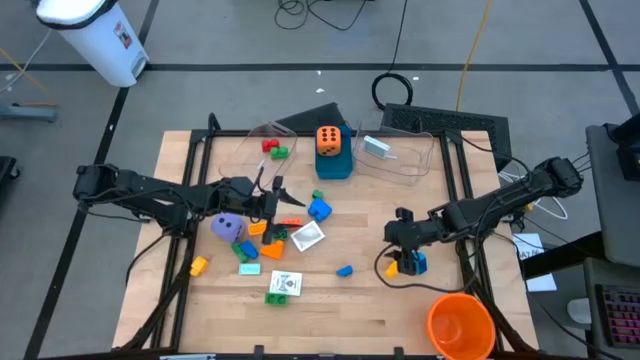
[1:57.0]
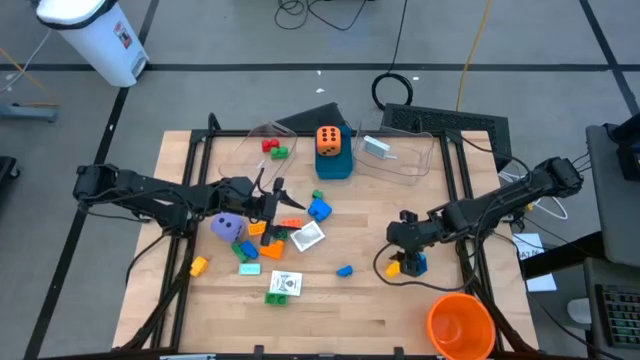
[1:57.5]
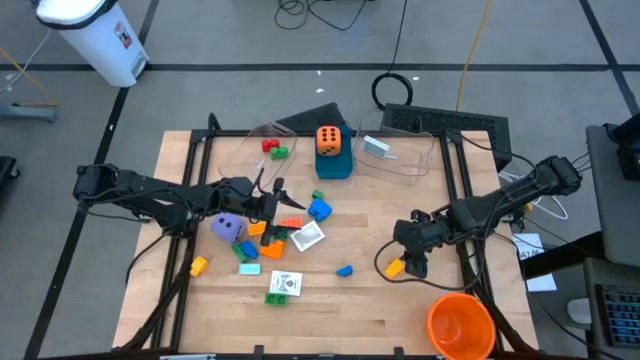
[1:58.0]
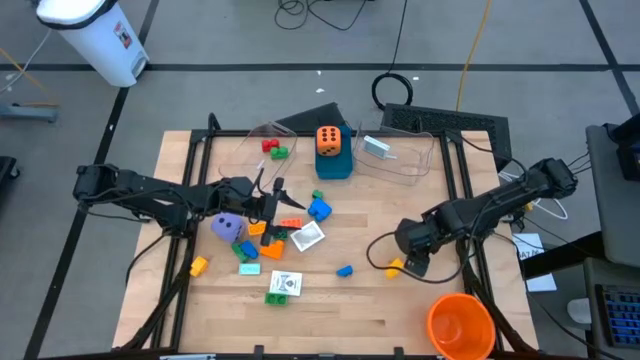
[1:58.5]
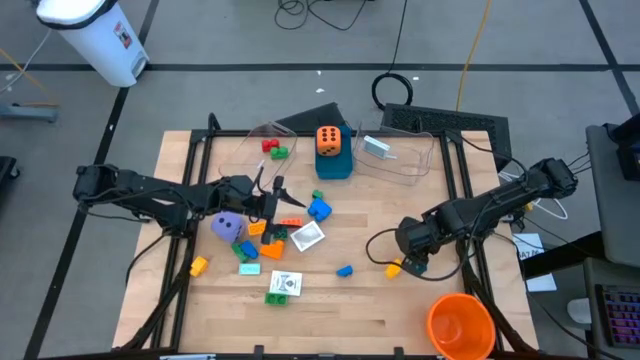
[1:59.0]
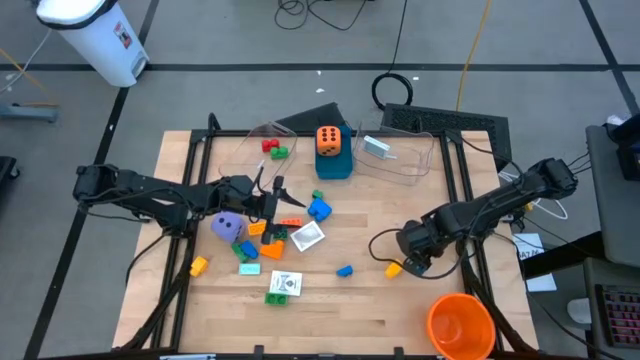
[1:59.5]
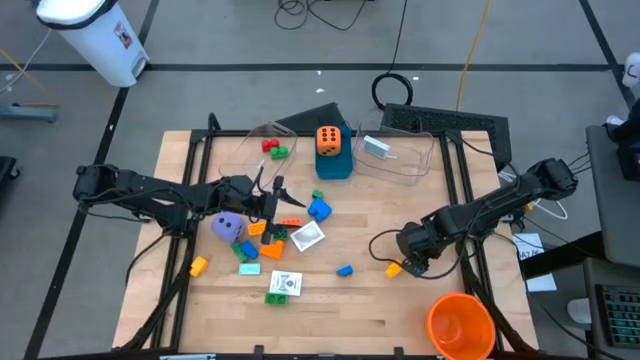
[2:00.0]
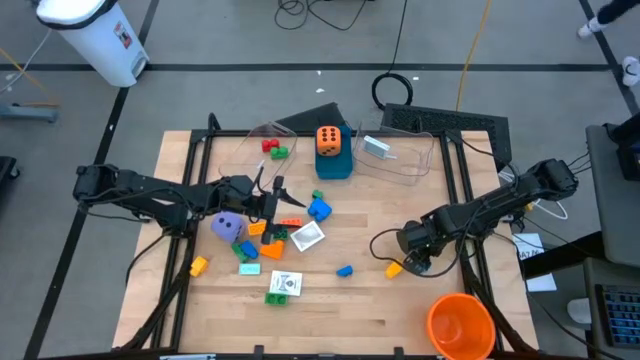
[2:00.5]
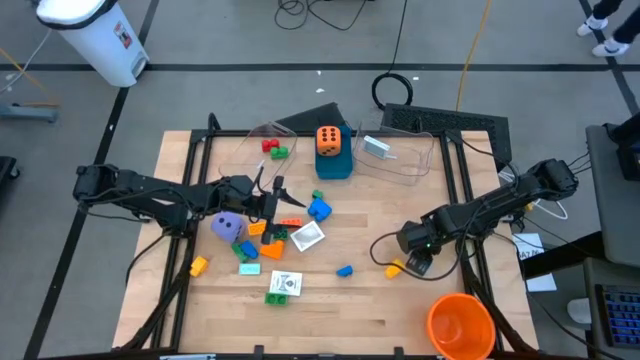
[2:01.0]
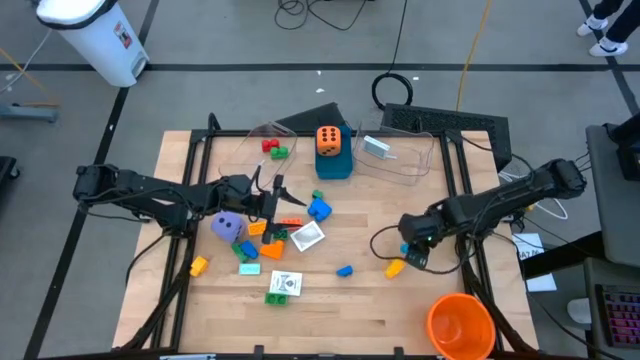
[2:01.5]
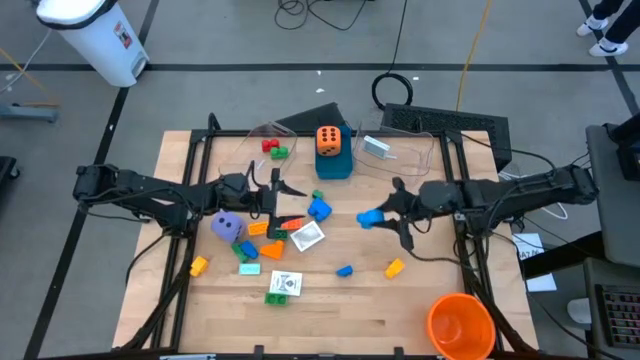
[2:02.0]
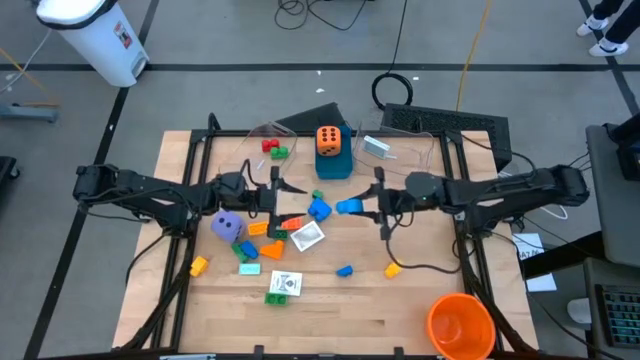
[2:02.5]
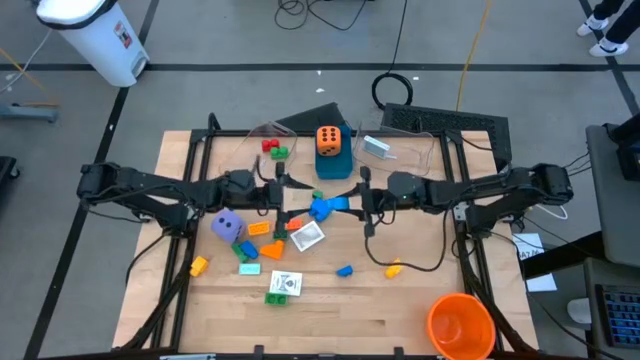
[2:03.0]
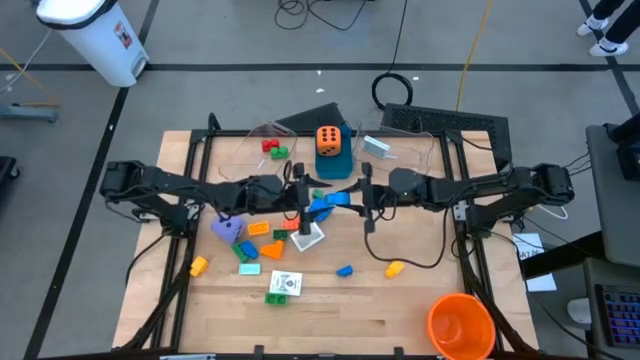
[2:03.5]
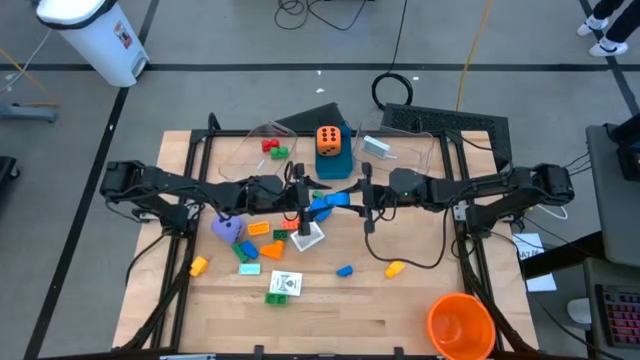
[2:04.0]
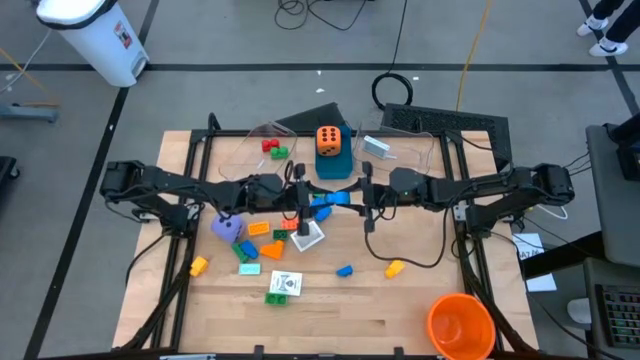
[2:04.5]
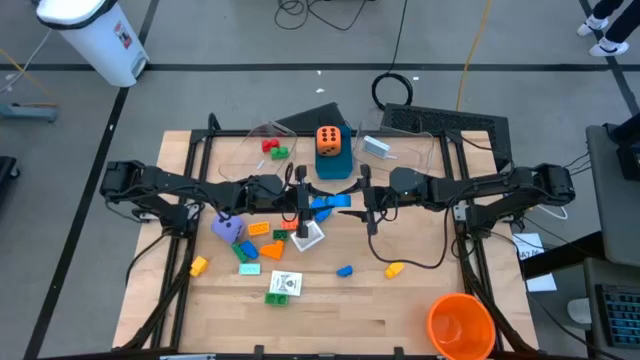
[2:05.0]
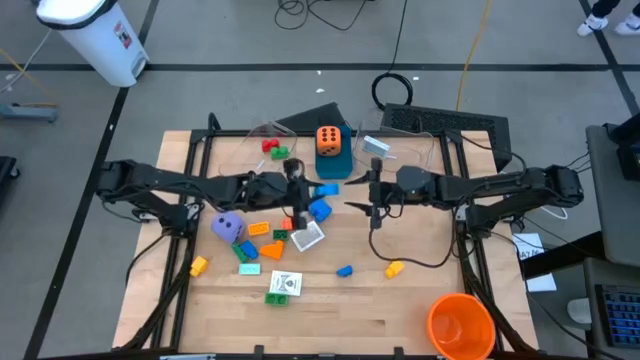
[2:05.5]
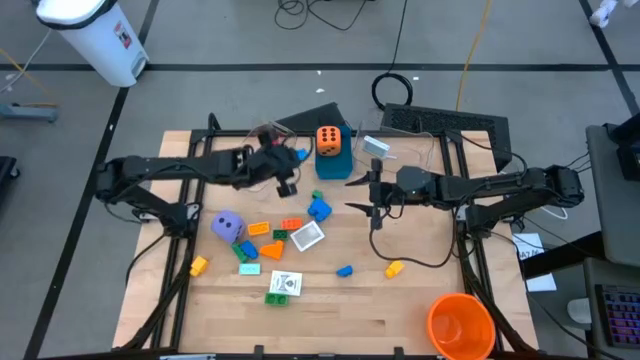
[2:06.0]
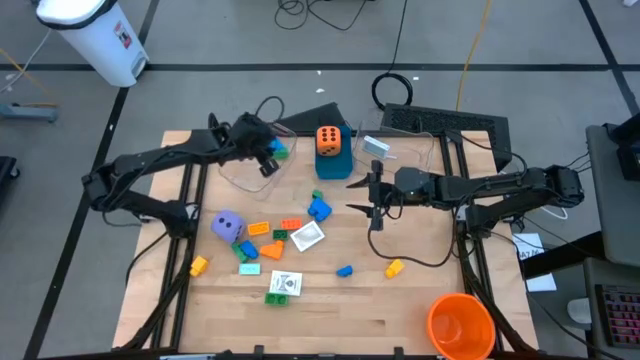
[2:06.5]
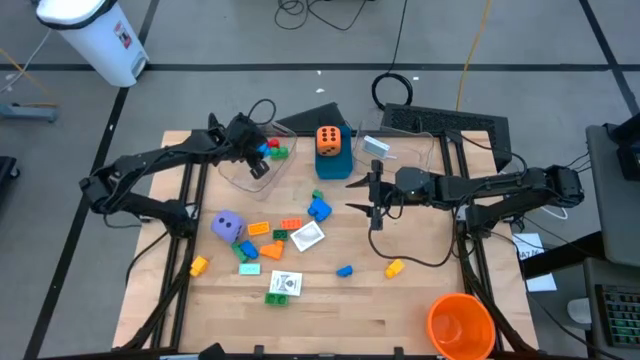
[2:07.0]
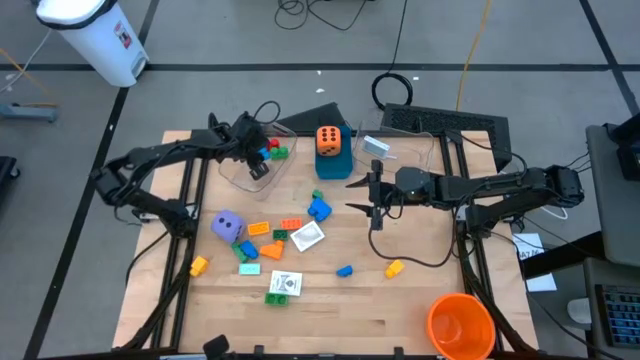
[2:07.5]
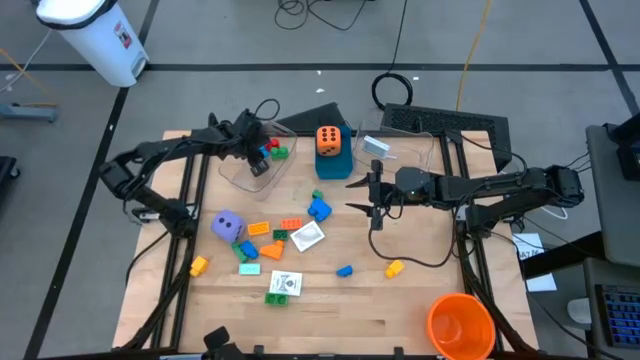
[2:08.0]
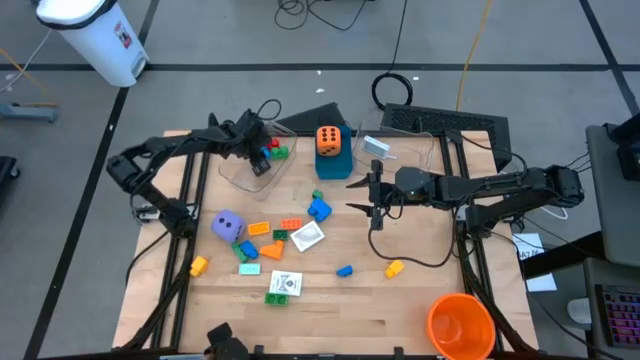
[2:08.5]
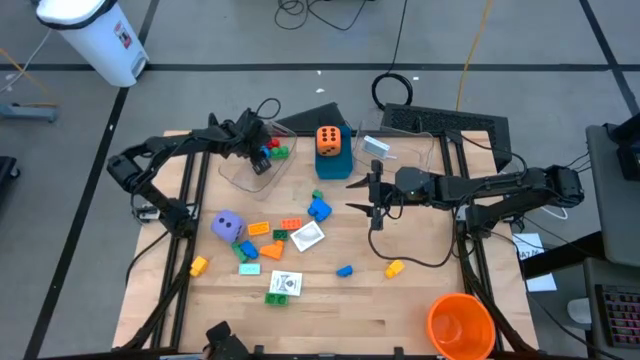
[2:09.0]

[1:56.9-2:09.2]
Task: Pick & Place Toys
Put the blue game piece into the left transparent bin

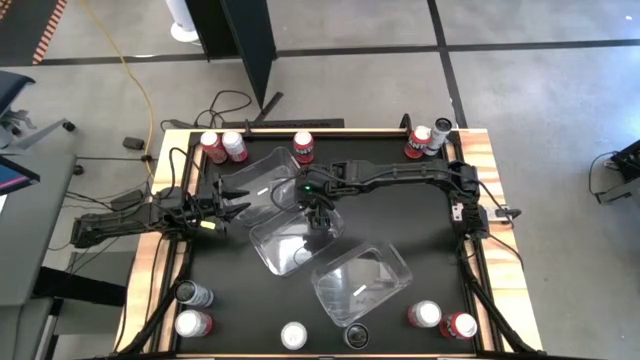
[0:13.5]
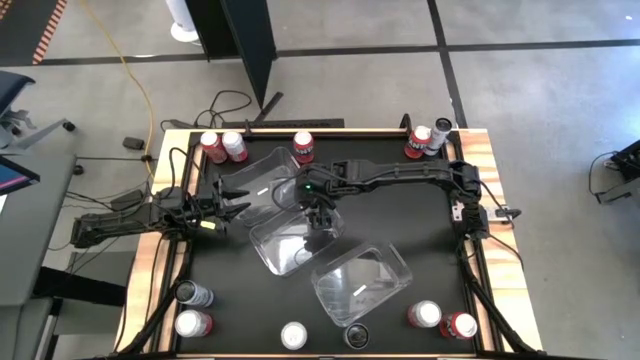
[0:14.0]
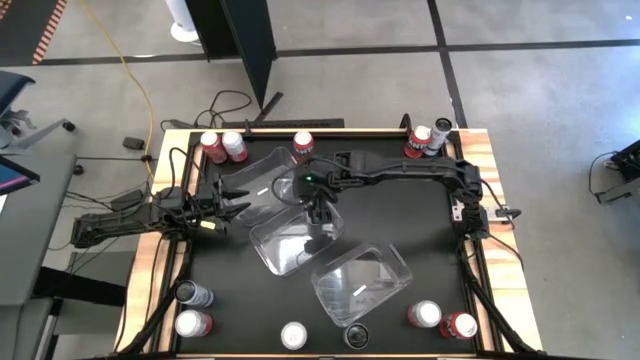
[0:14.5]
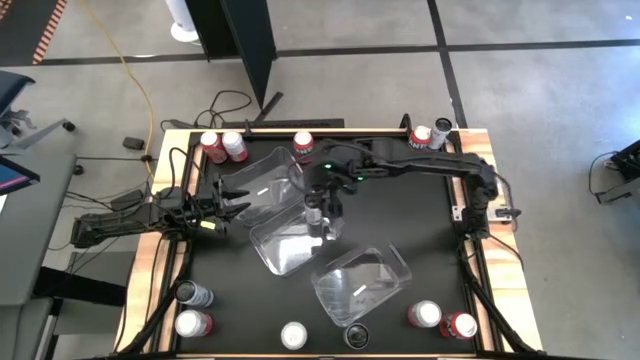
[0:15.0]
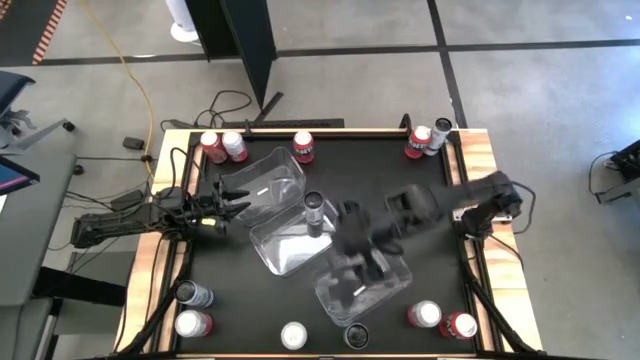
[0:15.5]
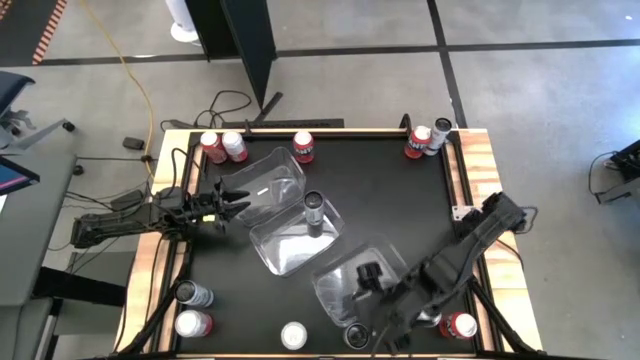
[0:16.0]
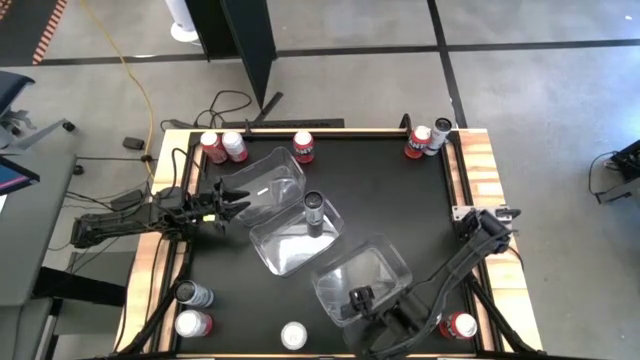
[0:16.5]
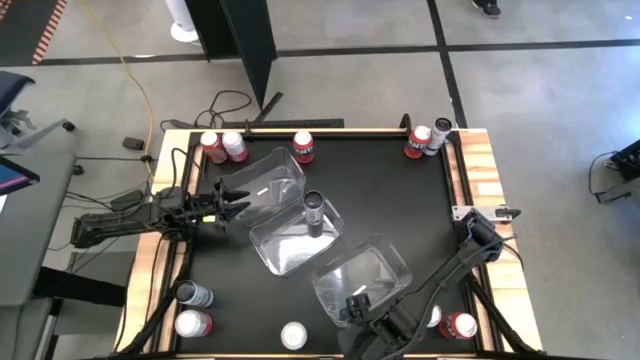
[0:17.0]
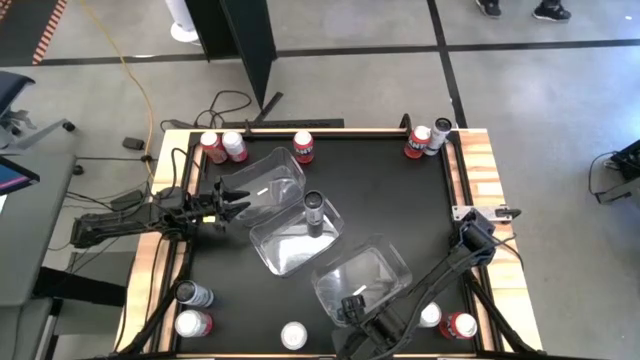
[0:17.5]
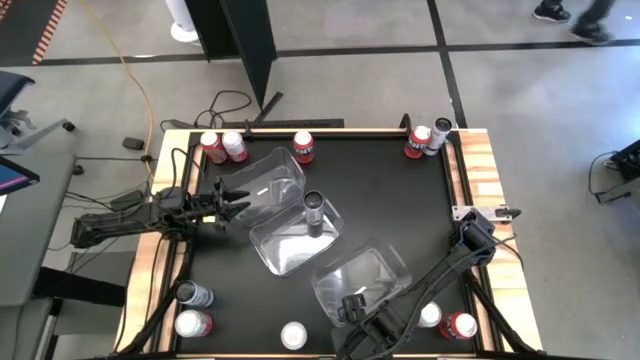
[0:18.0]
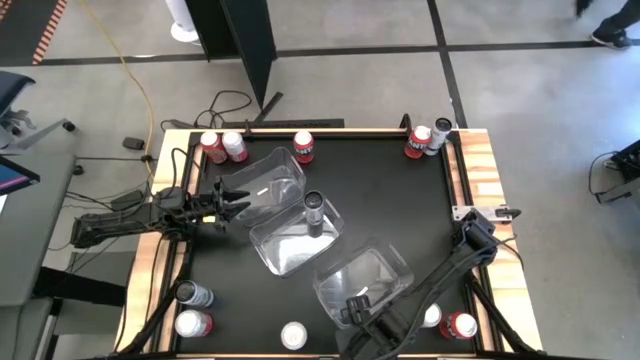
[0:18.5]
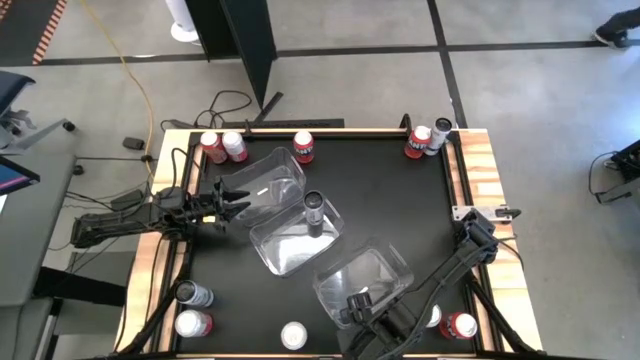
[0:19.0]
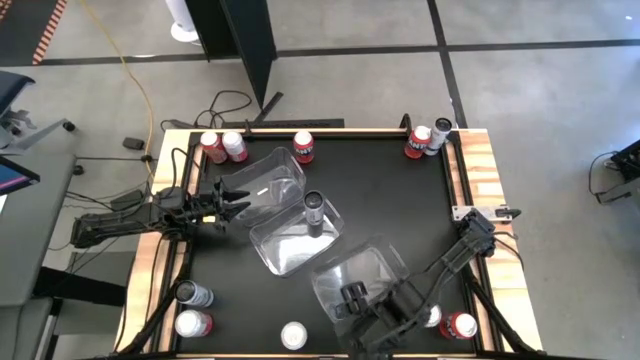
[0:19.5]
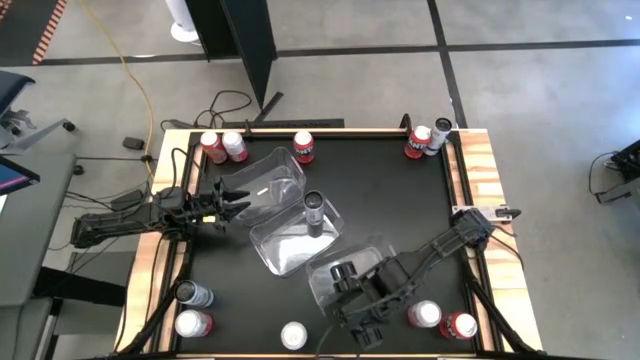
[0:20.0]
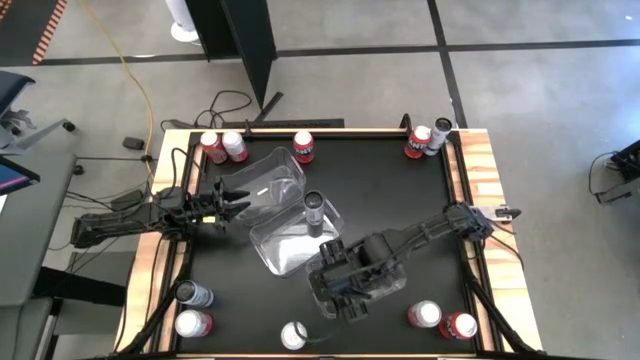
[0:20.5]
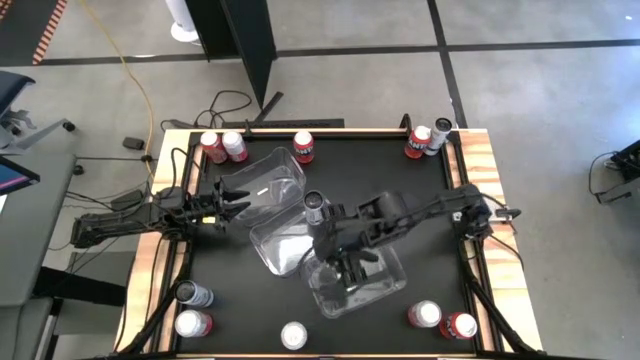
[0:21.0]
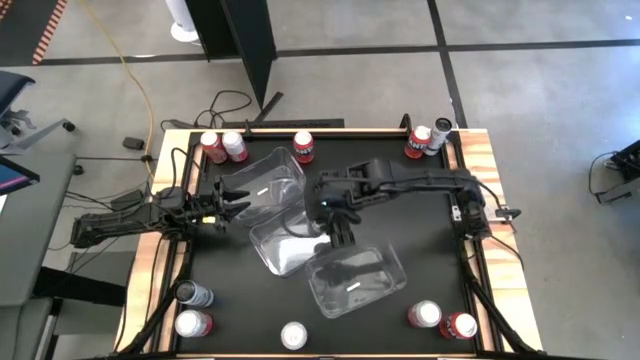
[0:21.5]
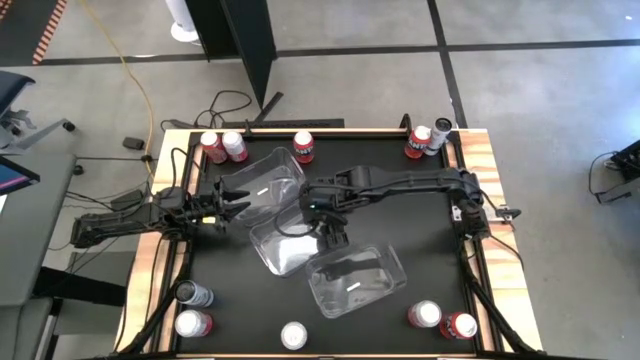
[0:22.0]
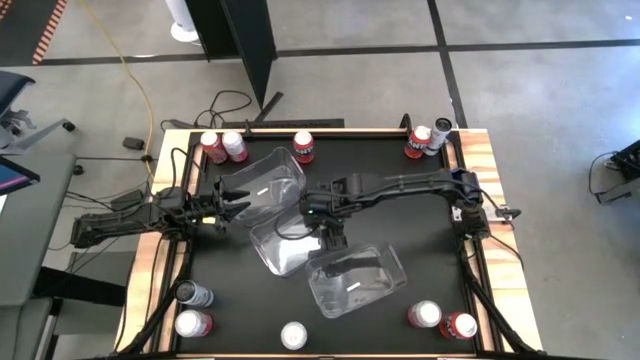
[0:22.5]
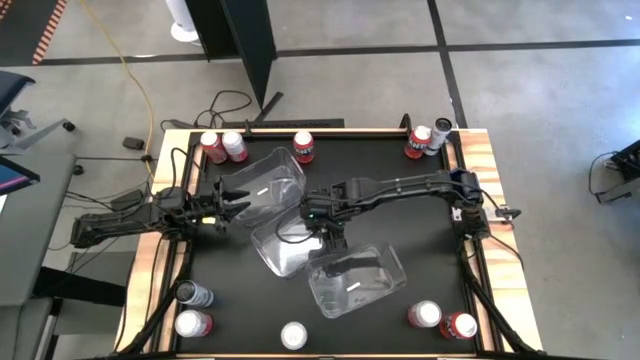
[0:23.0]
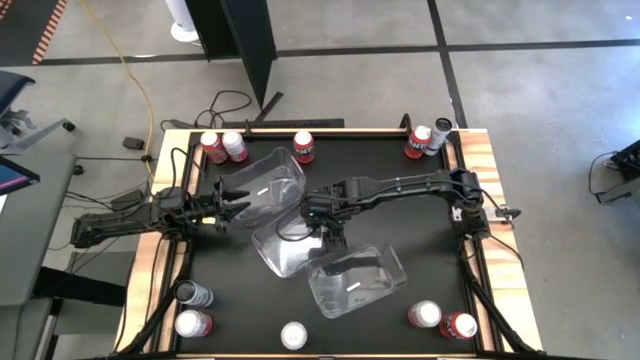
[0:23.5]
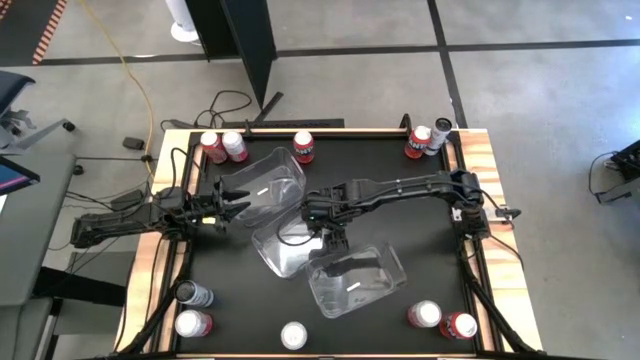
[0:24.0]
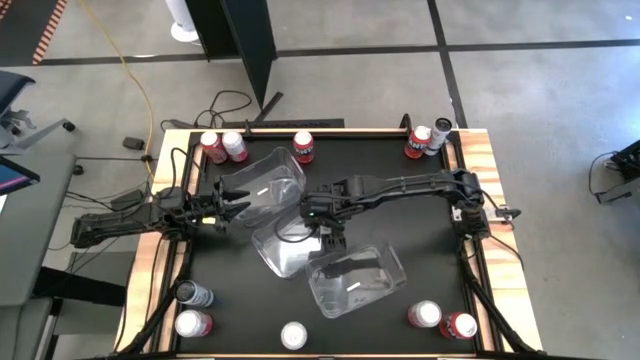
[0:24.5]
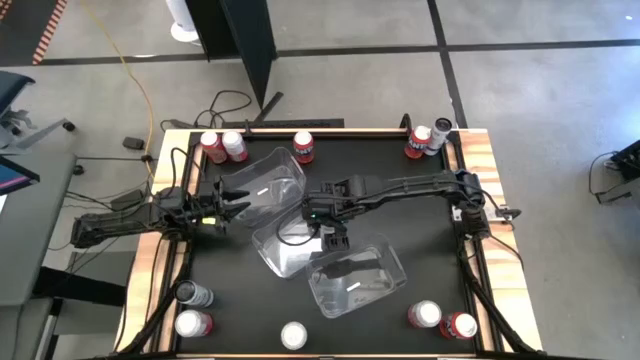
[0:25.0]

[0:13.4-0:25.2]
Task: Sort soda cans
Put the bottom middle white soda can in the center transparent bin
